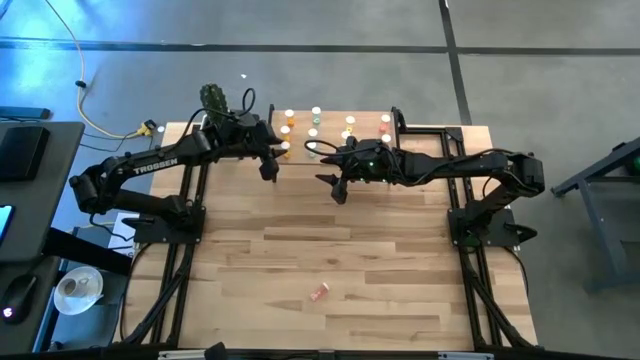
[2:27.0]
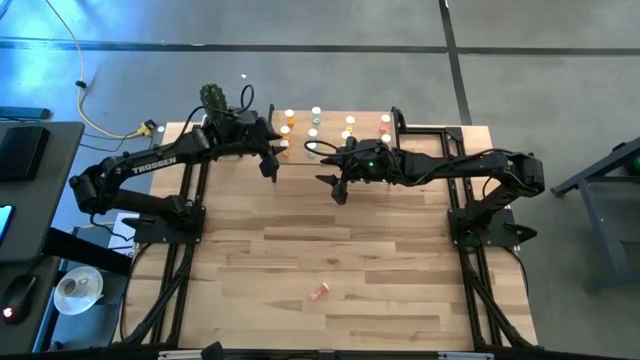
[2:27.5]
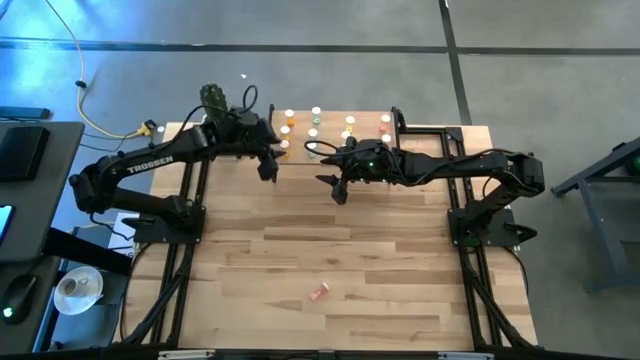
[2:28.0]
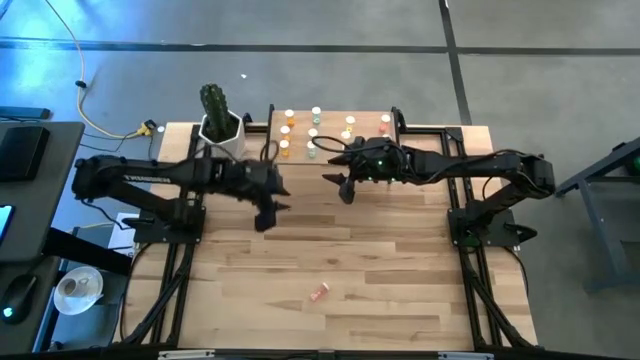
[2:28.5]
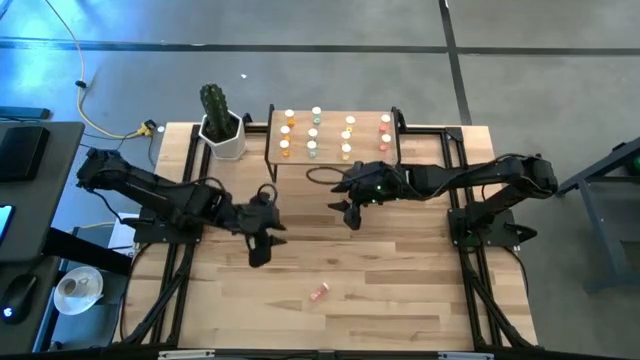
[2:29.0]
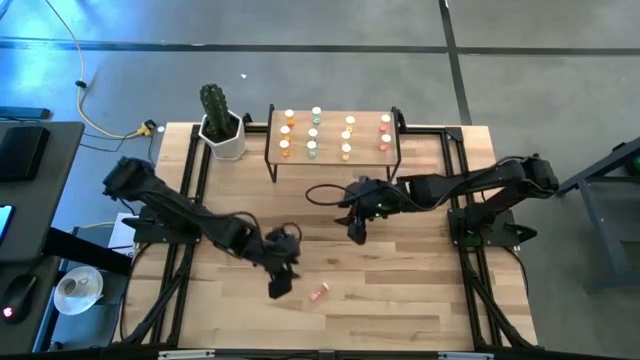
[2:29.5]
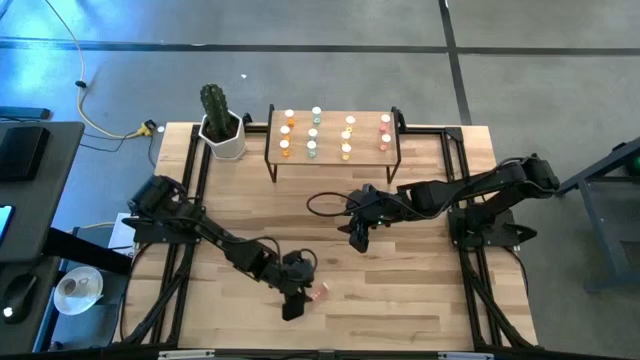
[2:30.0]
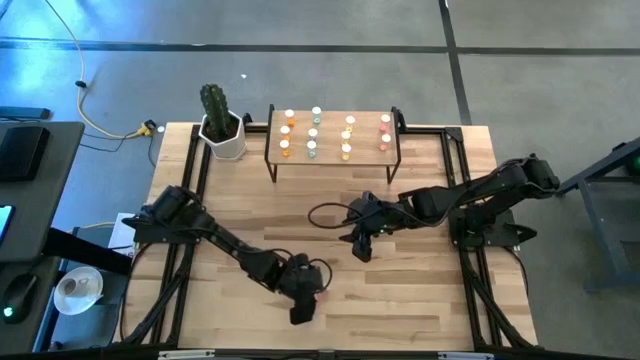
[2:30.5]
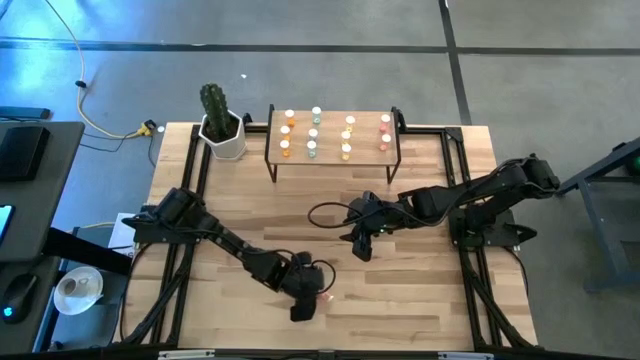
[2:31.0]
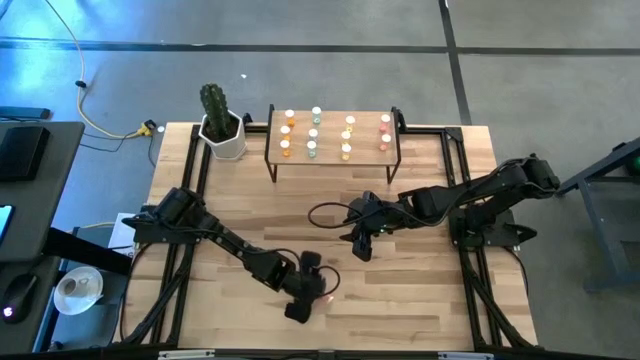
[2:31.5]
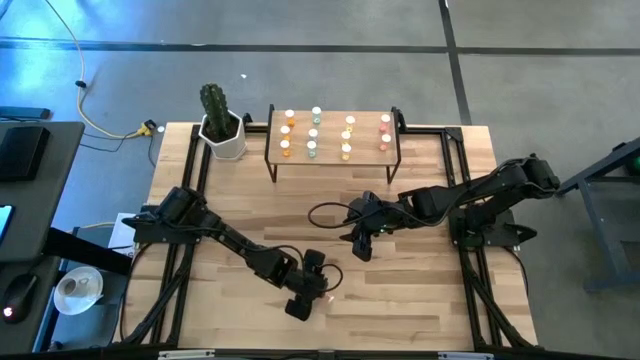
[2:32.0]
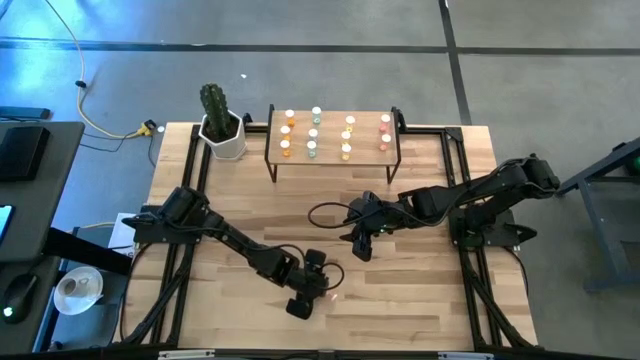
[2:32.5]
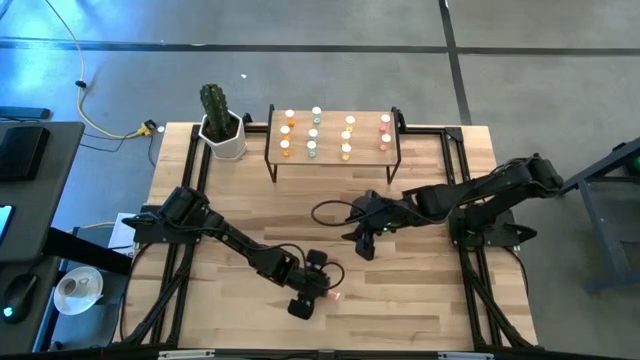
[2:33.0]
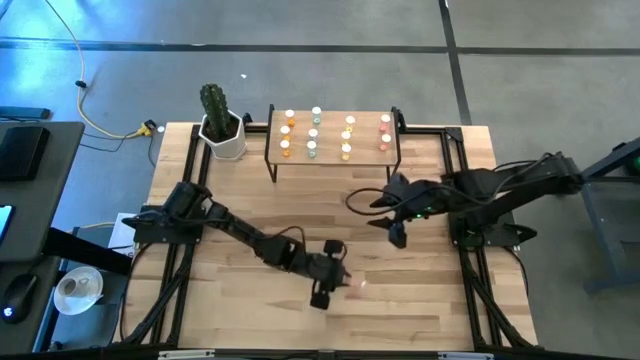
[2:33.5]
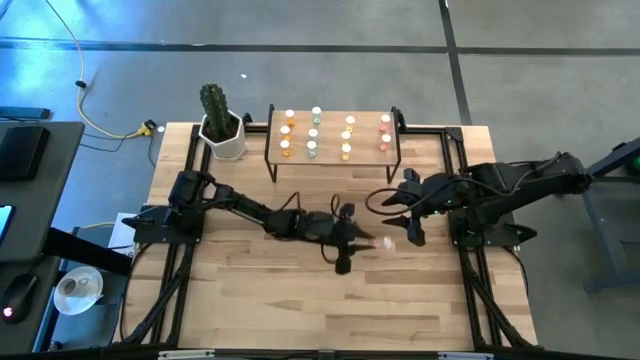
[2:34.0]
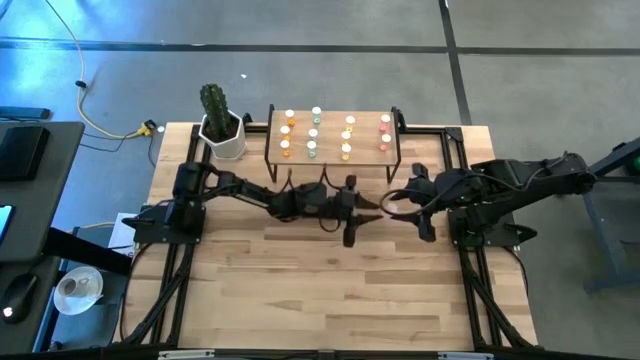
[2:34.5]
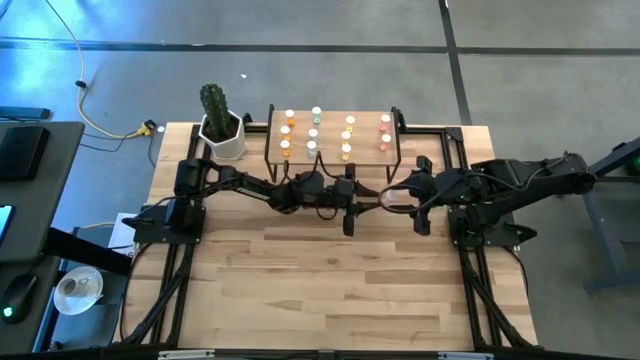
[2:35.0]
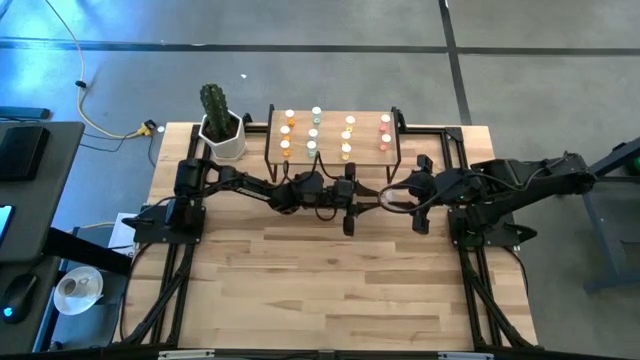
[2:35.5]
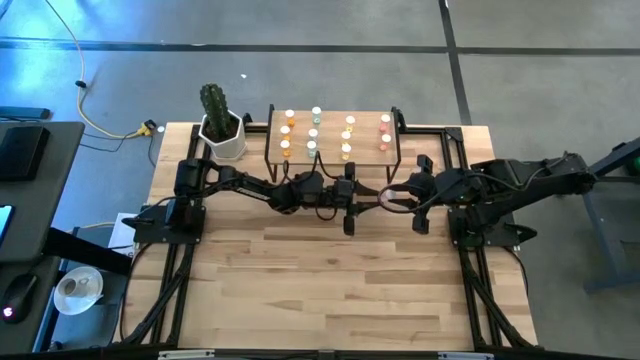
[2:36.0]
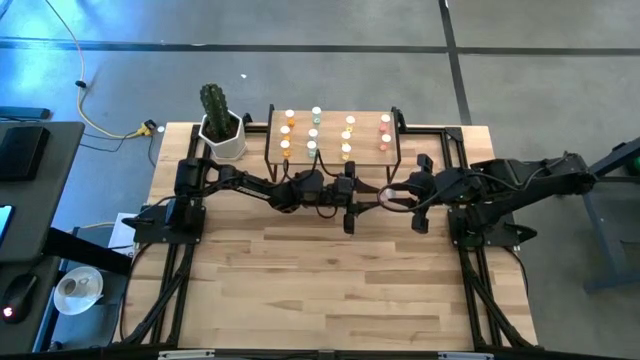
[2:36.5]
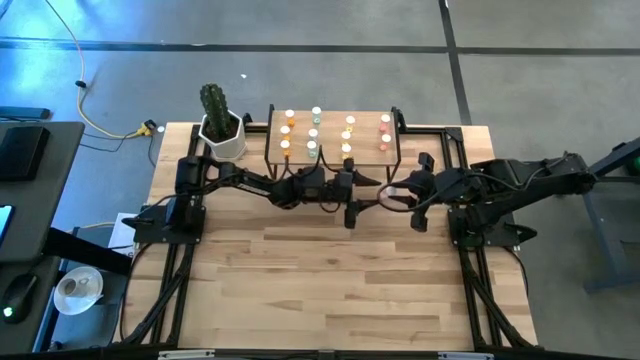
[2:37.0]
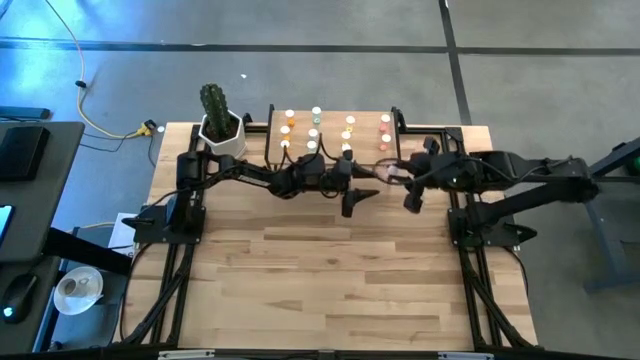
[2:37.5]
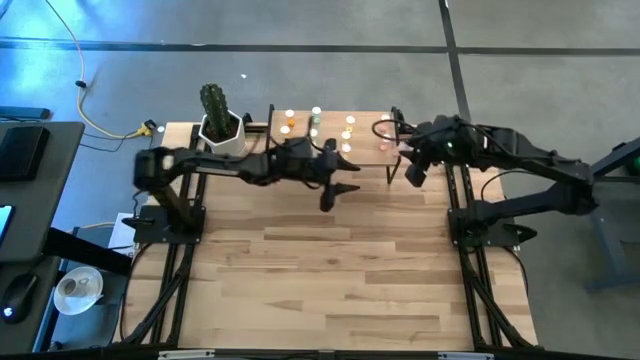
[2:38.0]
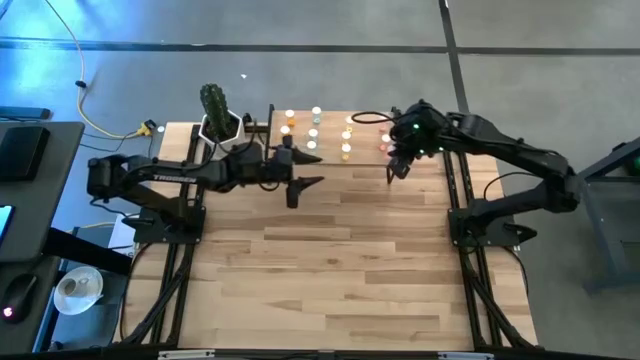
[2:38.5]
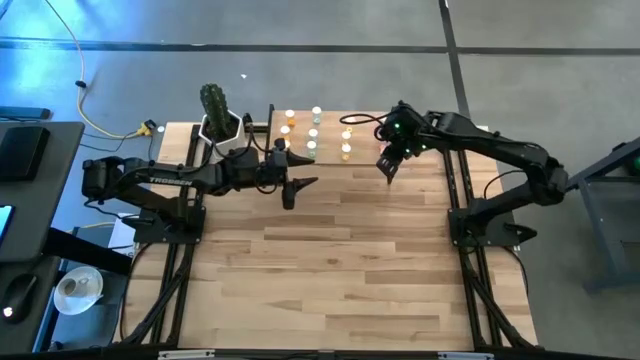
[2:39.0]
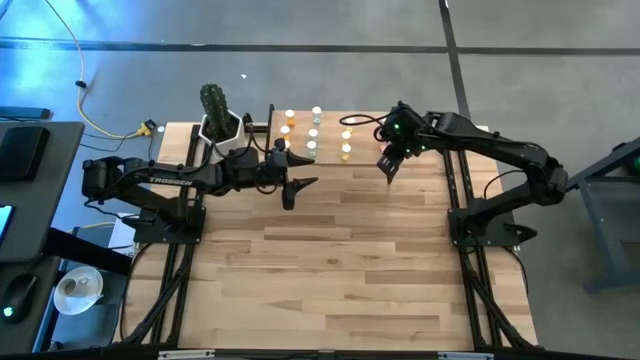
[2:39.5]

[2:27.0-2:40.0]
Task: Pick and place medicine bottles onto shelf by color
Put the pink pill bottle on the shelf

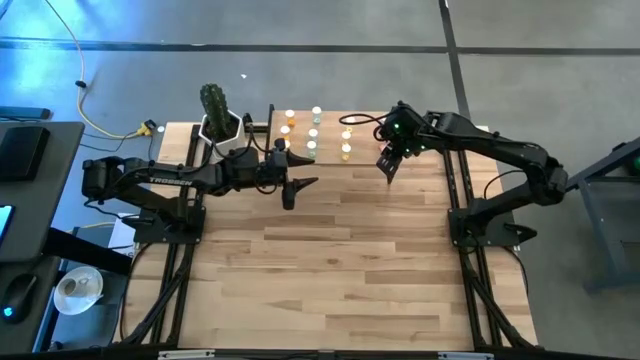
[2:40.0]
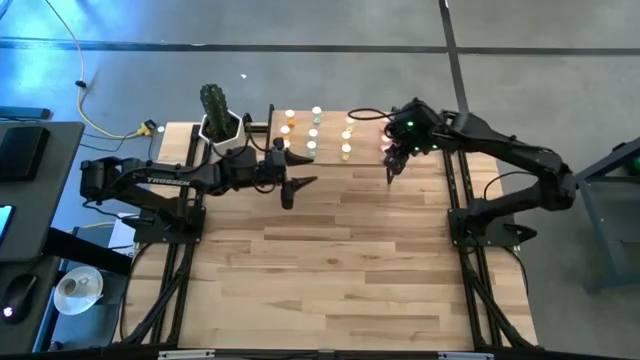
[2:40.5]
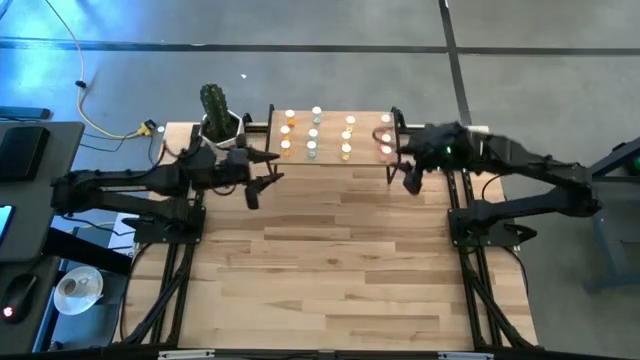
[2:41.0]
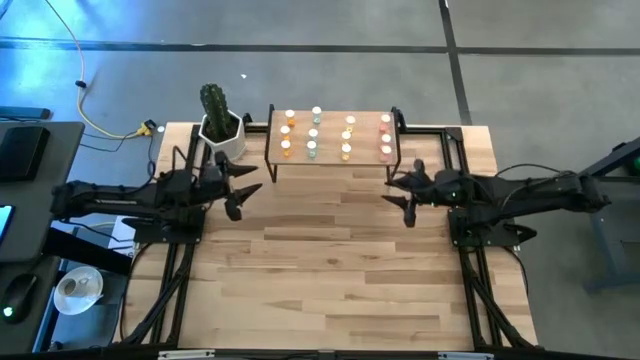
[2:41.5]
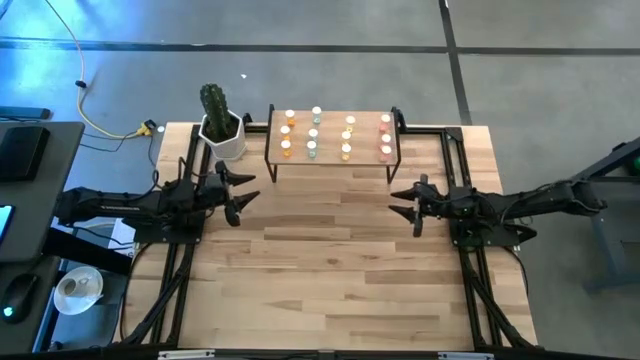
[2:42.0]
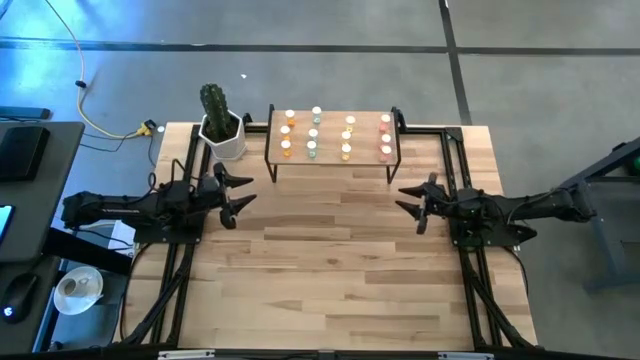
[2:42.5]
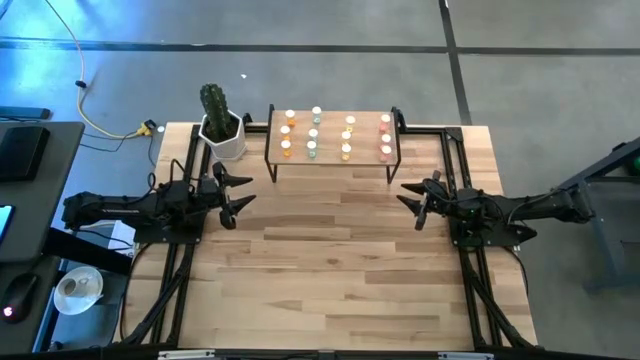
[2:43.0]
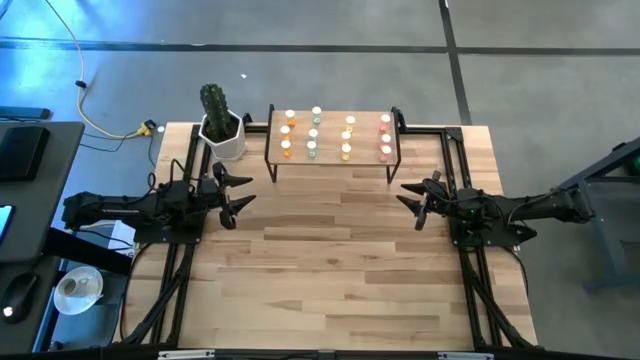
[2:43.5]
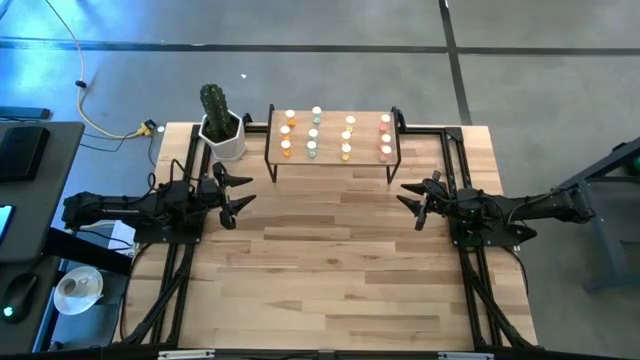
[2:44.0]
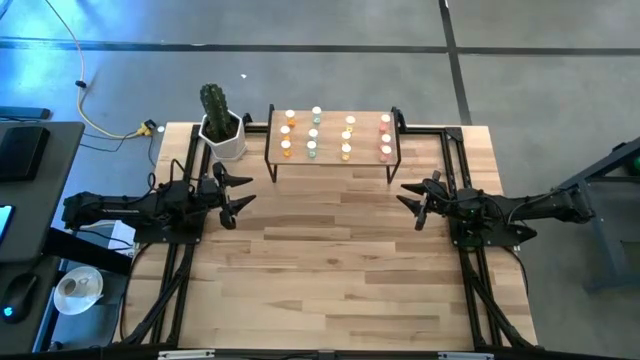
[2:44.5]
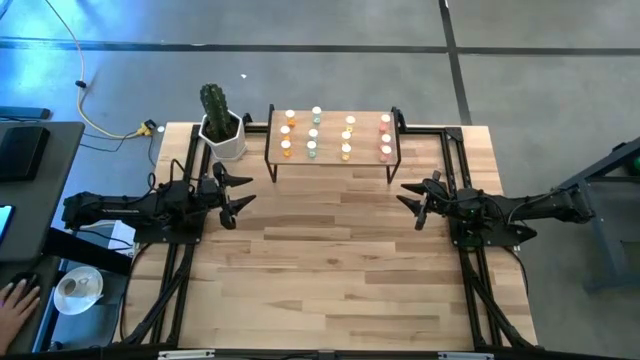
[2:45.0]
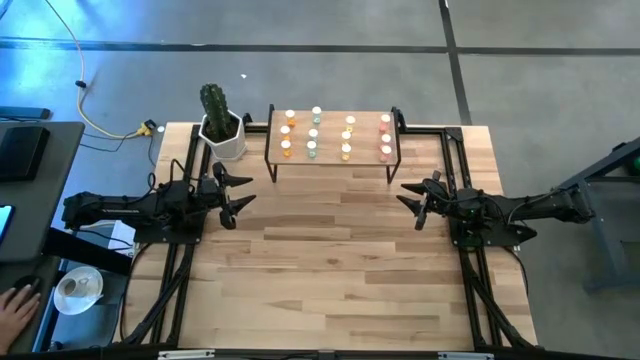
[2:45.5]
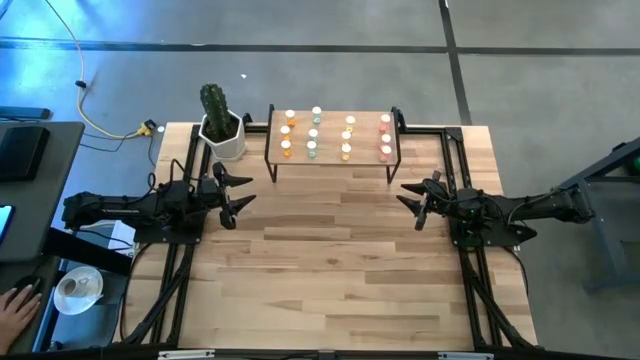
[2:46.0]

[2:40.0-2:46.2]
Return to Home Position

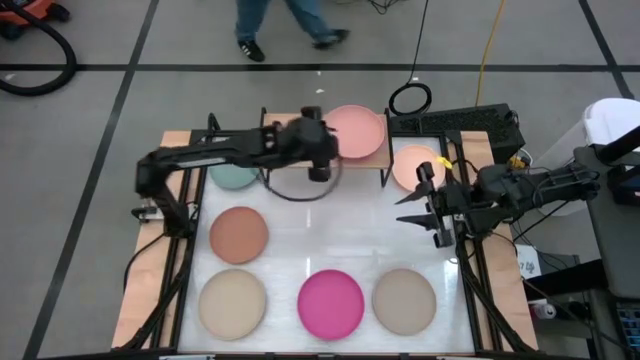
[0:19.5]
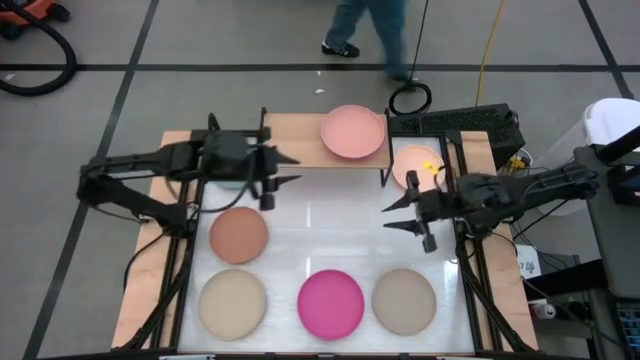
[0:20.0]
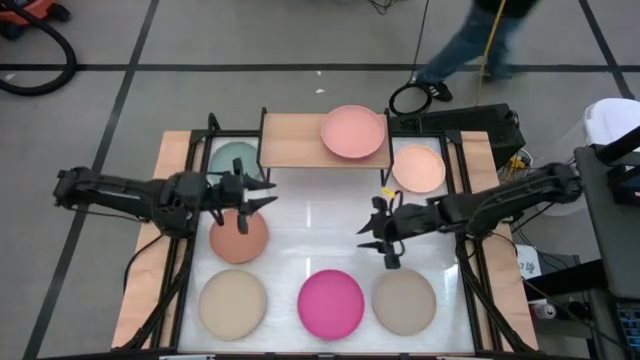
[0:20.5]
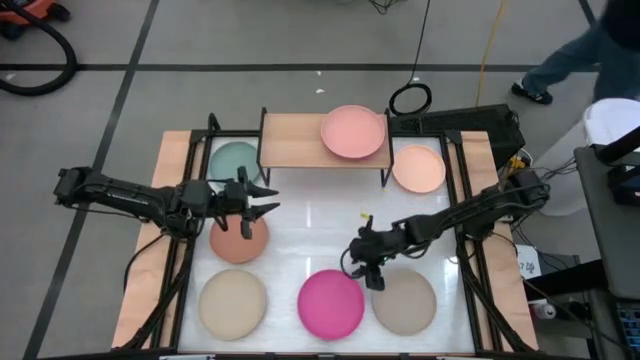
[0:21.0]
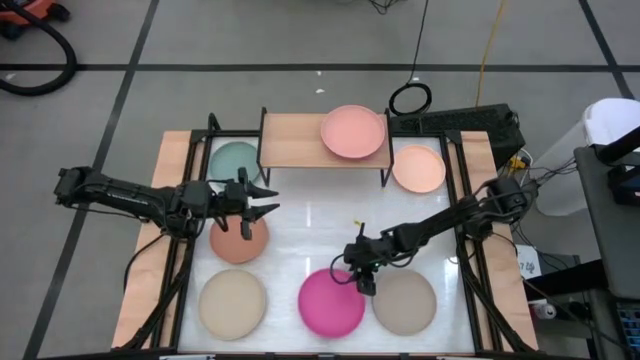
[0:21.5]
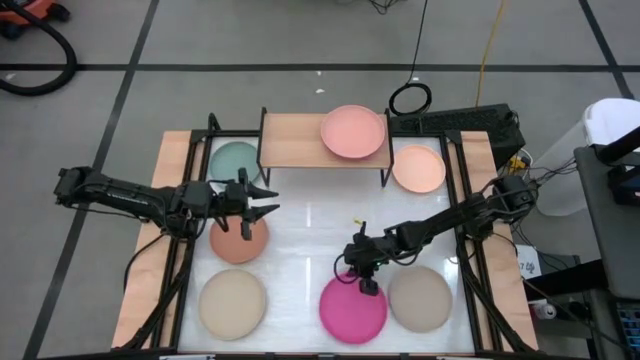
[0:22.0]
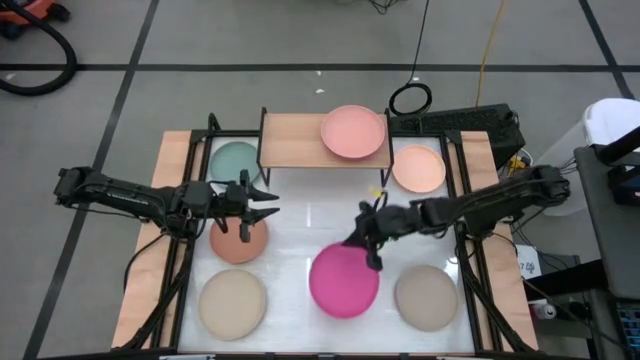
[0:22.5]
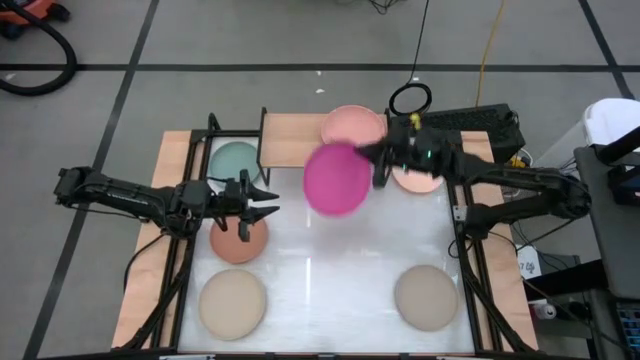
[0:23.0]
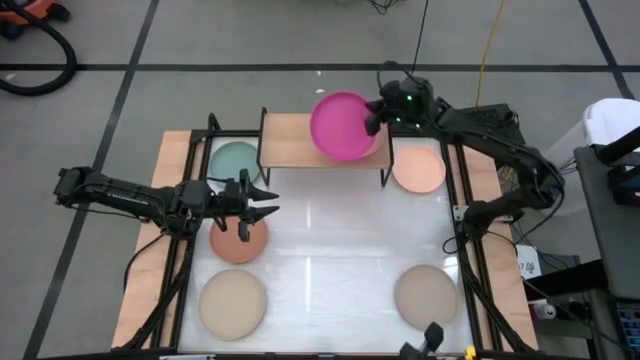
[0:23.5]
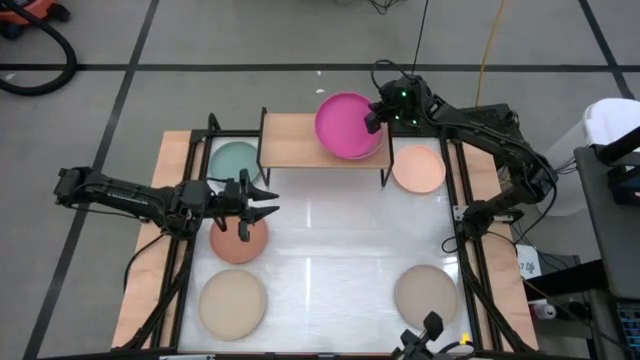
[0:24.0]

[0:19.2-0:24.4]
Task: Place and stack plates onto a shelf
Stack the pink plate on the light pink plate on the shelf
